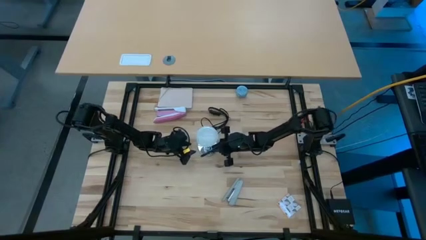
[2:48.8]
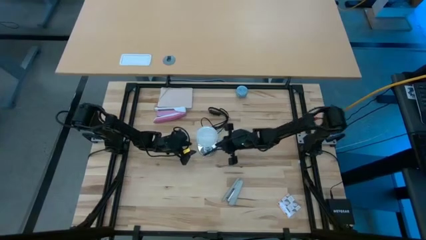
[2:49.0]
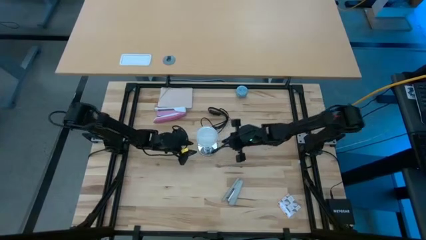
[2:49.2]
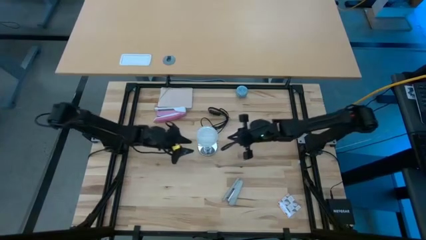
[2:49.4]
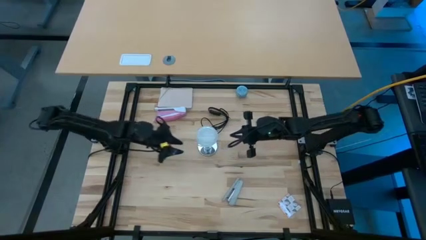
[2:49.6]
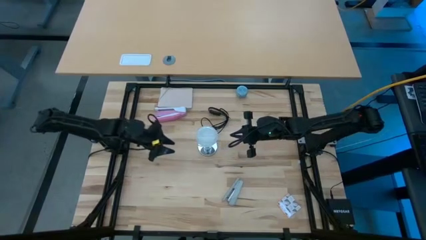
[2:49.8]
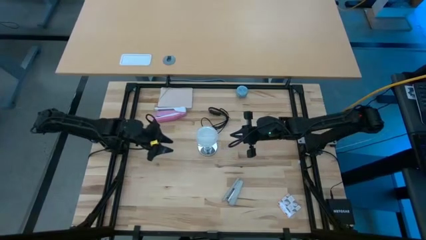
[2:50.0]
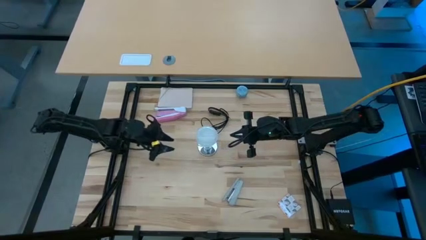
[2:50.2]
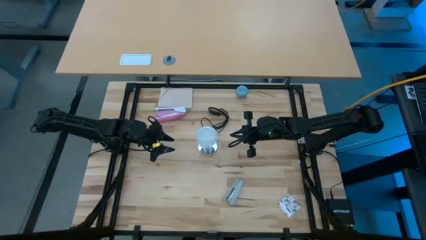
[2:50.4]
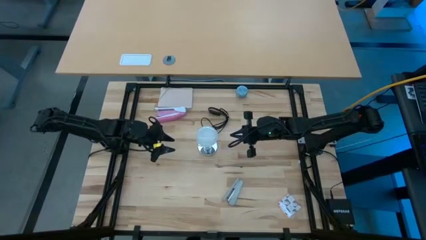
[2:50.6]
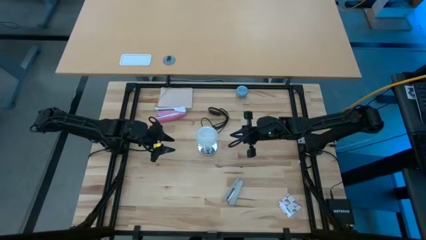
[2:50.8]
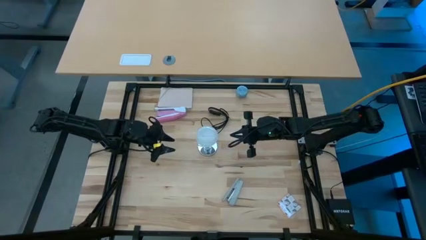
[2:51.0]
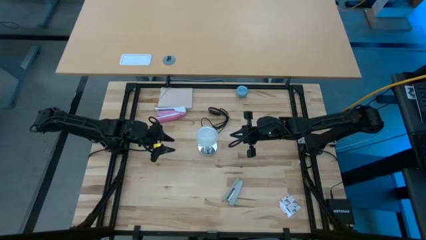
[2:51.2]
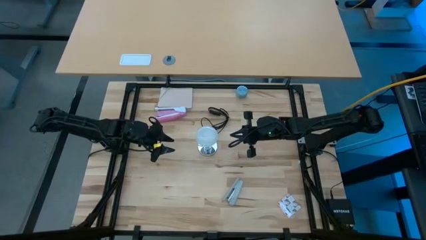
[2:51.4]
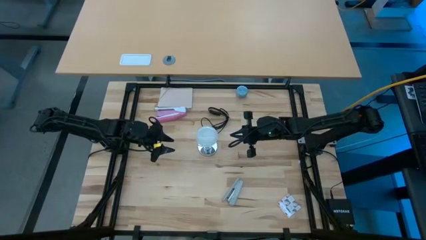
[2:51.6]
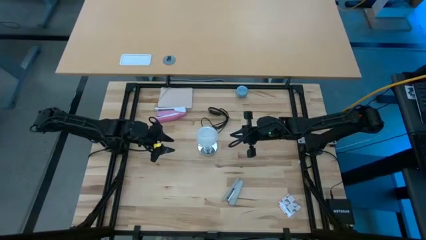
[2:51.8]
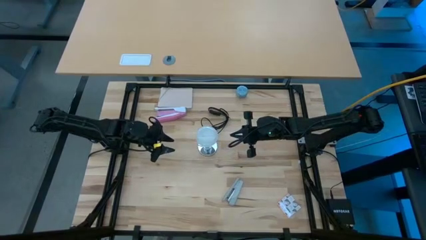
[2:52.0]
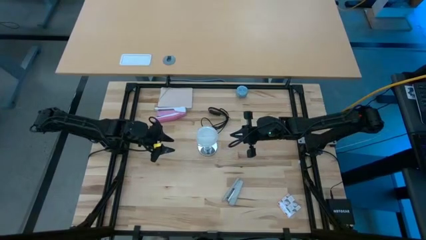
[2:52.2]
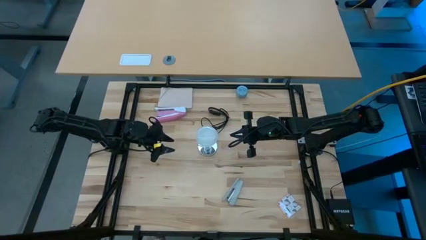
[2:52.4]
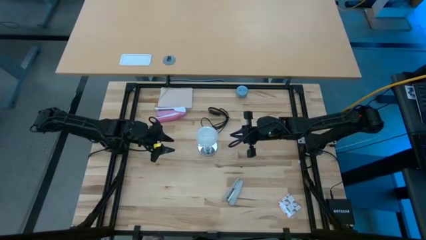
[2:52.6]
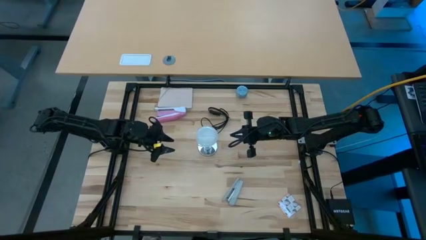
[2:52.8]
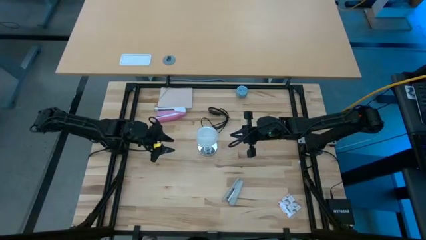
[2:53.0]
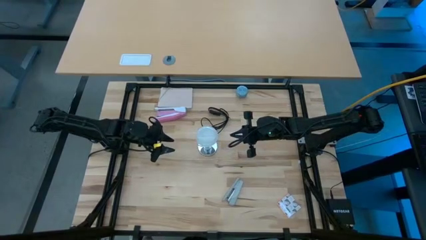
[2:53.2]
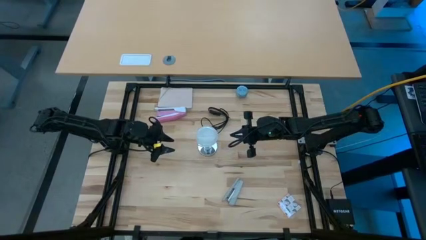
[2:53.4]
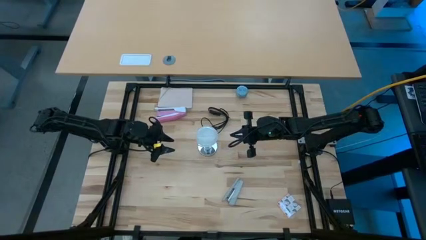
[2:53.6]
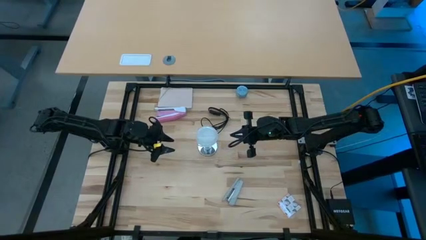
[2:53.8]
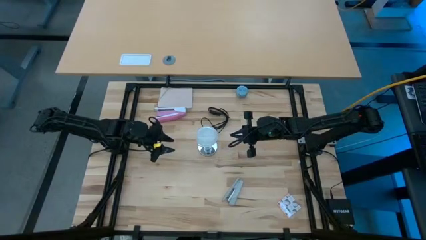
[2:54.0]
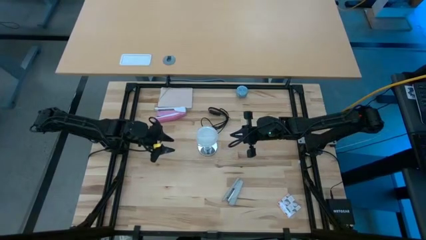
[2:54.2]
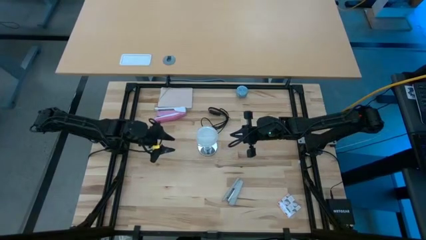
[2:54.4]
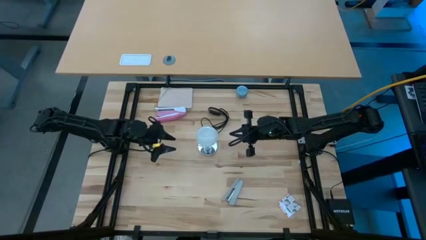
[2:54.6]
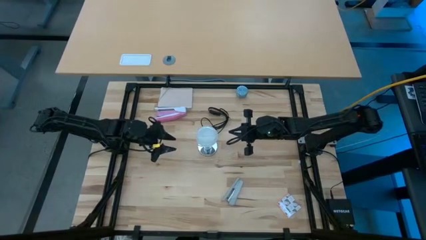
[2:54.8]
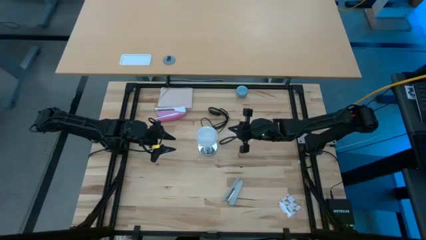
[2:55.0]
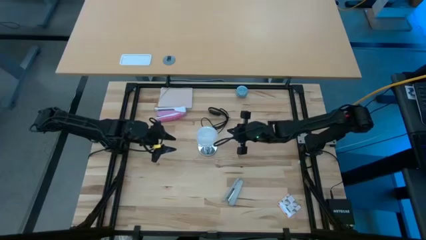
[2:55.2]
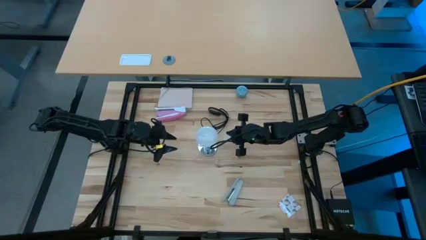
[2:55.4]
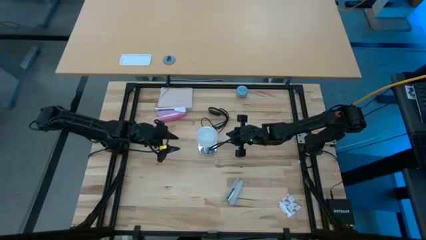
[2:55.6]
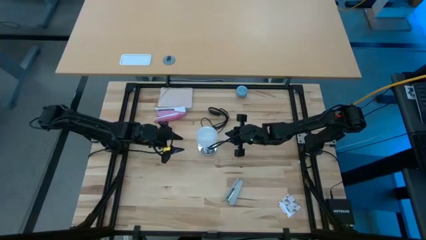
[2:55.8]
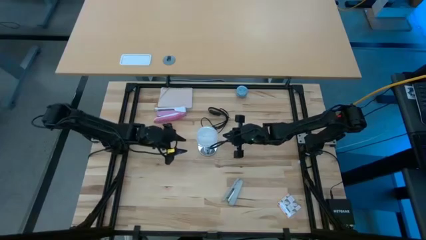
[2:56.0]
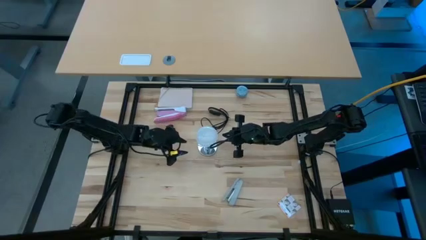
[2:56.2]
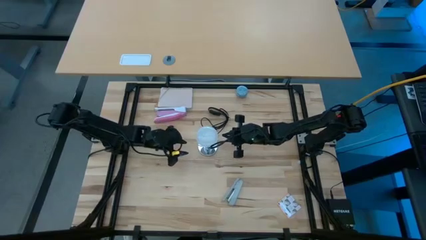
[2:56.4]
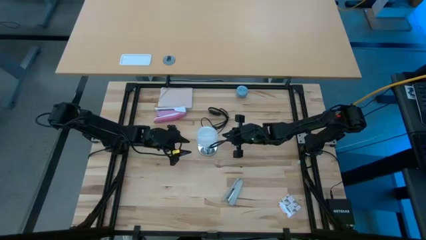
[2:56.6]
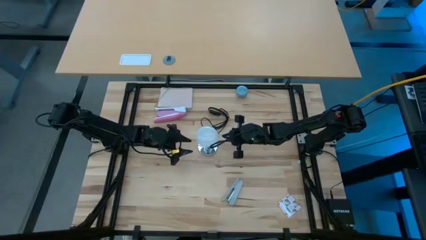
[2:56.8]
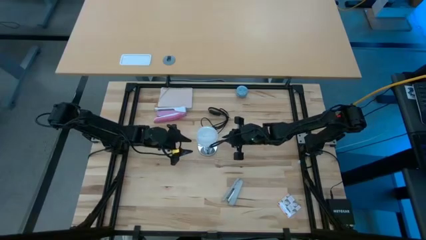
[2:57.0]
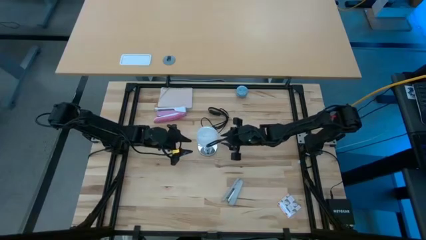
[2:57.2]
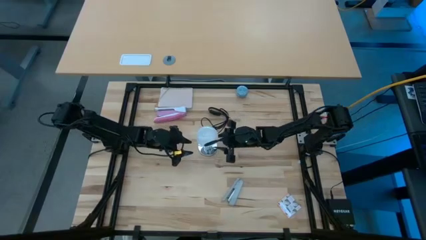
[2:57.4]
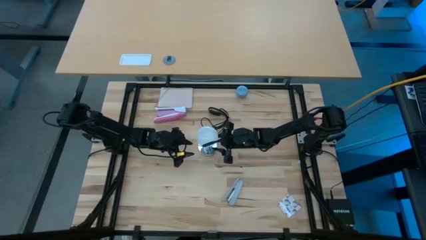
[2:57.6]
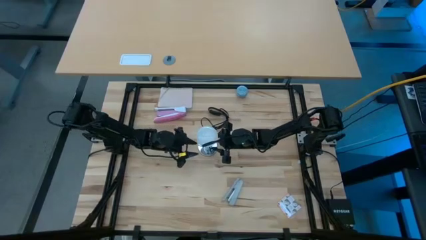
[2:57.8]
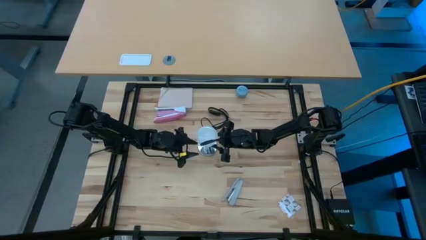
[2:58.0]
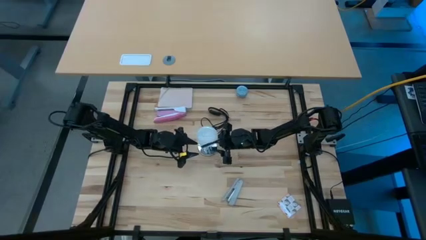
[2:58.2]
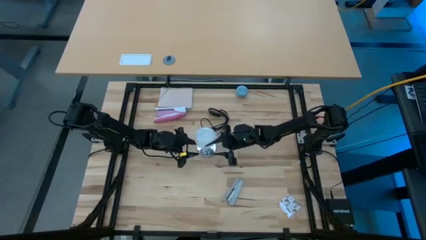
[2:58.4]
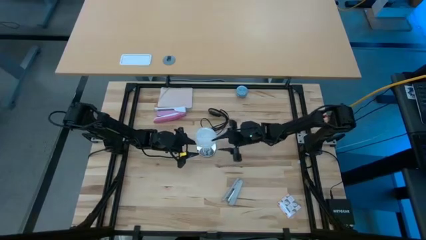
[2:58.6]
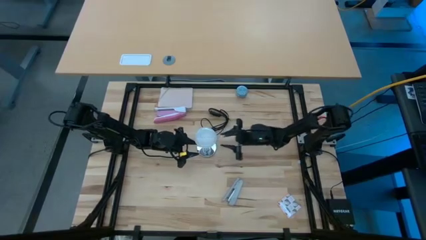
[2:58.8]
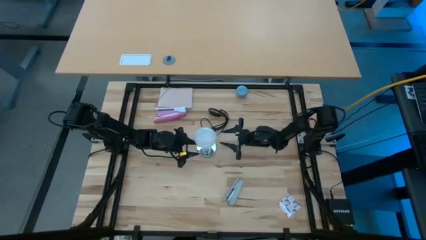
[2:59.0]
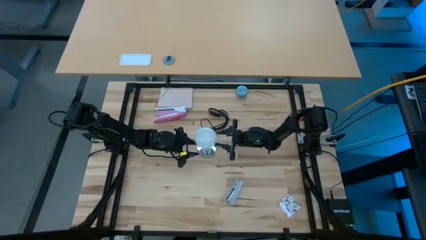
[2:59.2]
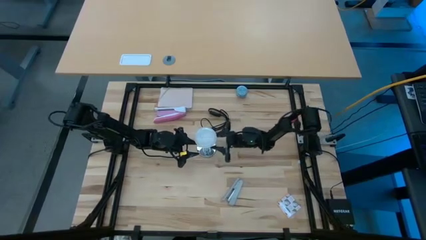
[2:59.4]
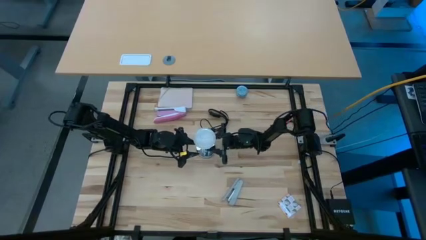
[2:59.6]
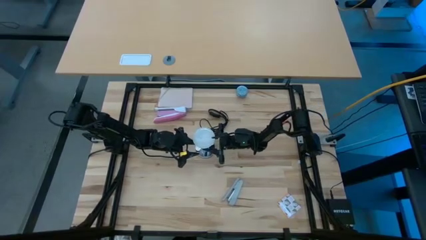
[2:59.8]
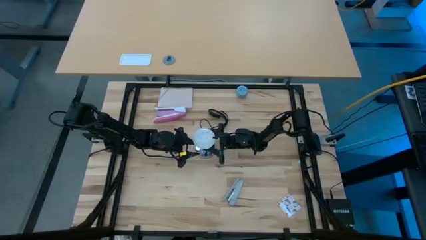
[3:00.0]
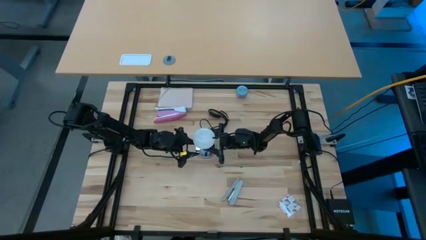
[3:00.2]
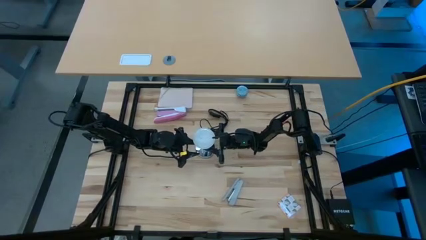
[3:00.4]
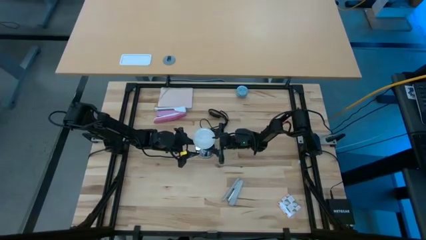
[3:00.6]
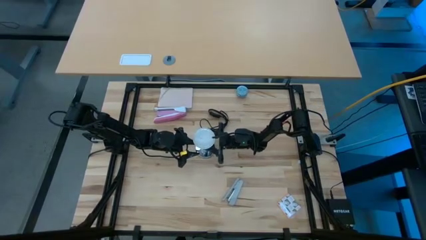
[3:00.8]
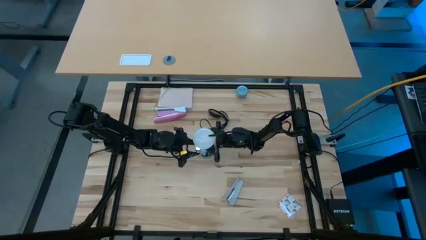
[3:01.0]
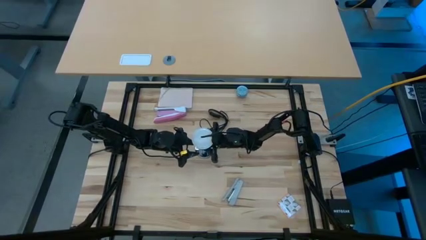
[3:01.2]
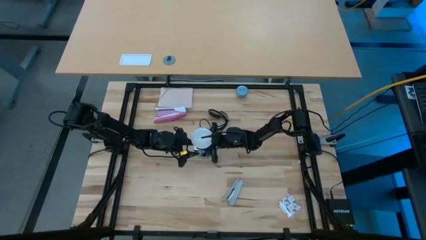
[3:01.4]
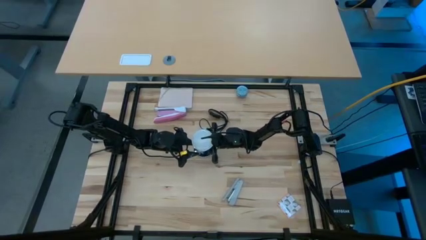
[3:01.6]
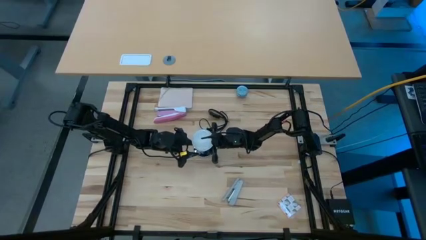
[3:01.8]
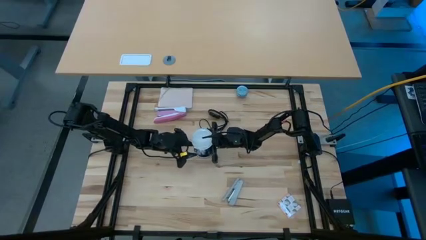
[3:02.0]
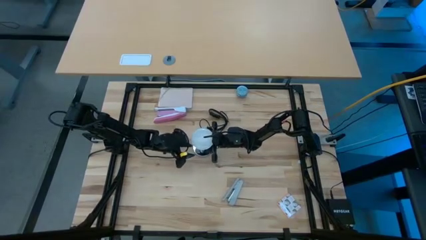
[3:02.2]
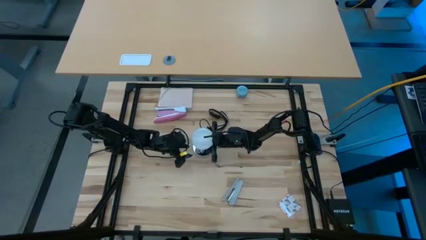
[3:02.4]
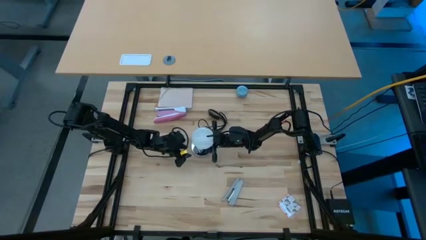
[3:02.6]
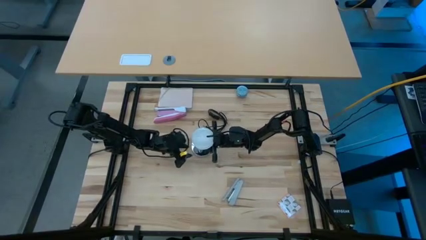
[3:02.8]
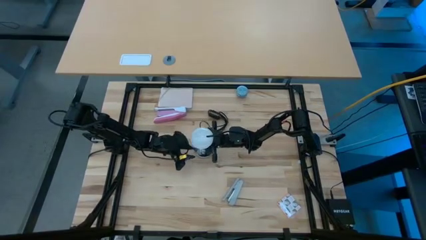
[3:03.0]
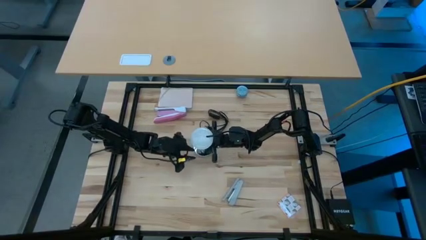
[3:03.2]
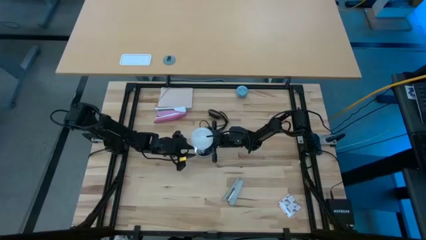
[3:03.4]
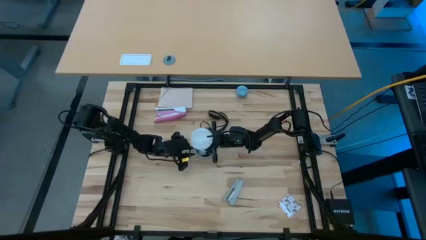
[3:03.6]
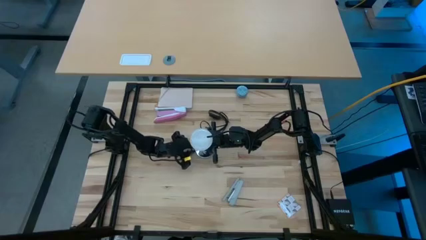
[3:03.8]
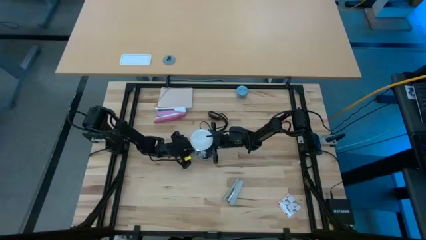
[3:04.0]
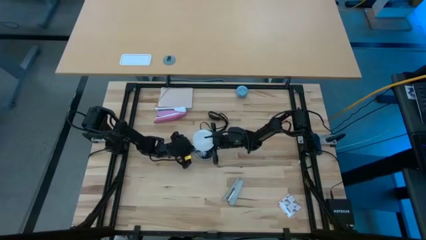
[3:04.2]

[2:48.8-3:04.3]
Task: Screw lightbulb
Remove the lightbulb from the lamp
